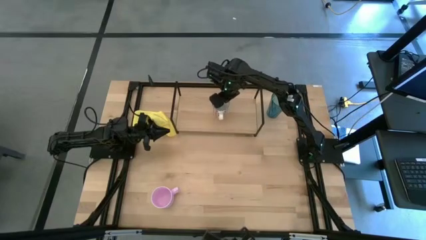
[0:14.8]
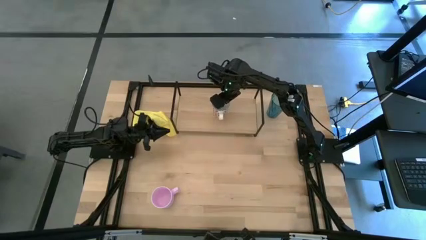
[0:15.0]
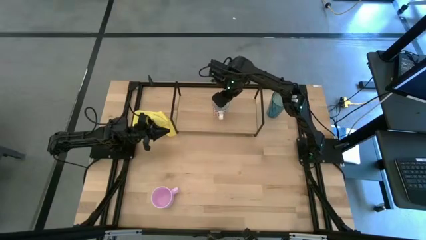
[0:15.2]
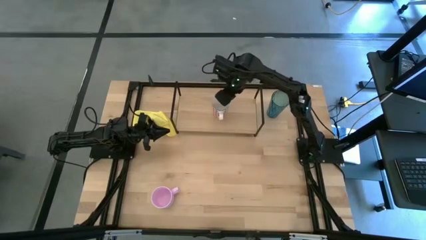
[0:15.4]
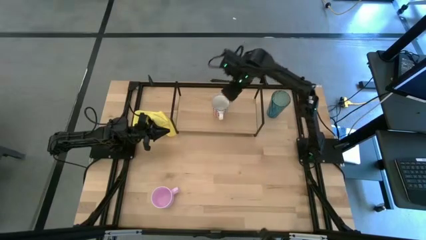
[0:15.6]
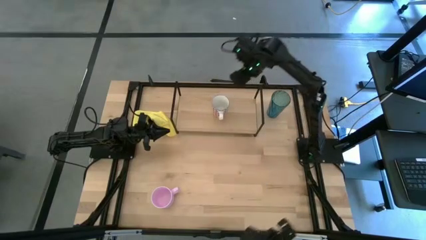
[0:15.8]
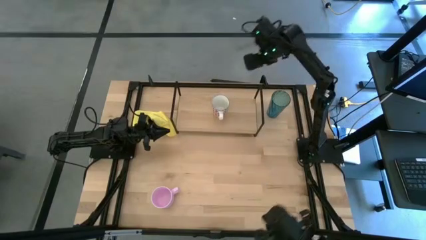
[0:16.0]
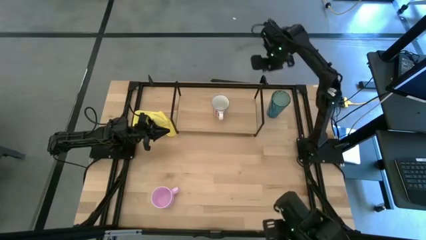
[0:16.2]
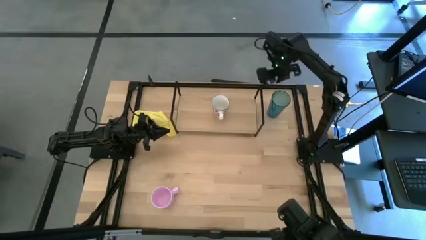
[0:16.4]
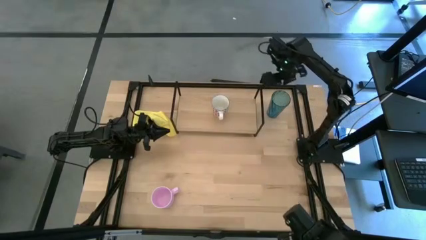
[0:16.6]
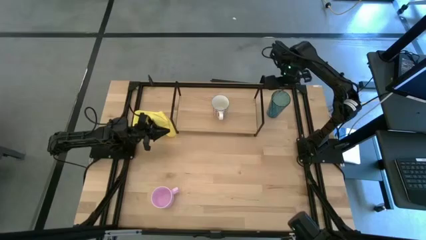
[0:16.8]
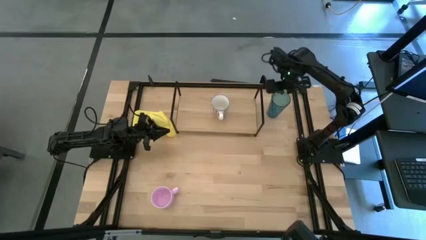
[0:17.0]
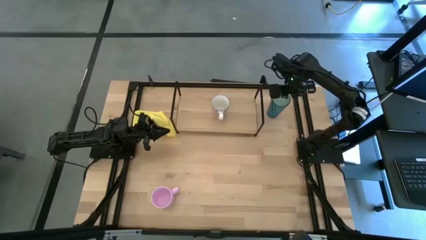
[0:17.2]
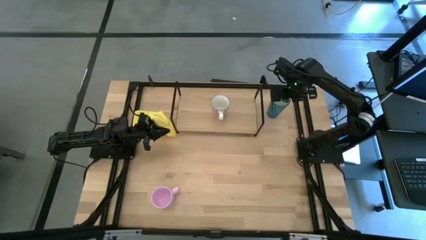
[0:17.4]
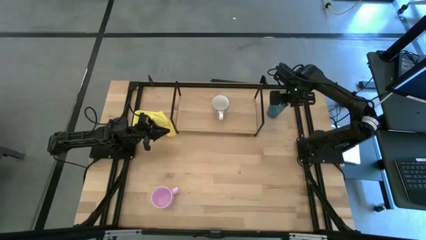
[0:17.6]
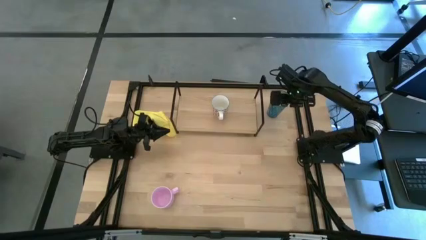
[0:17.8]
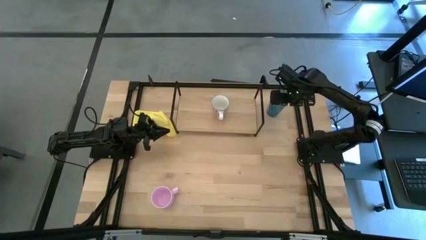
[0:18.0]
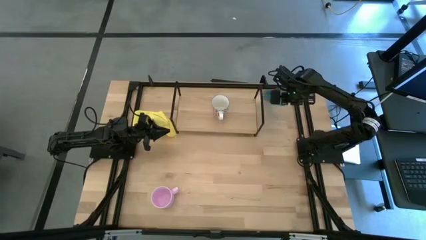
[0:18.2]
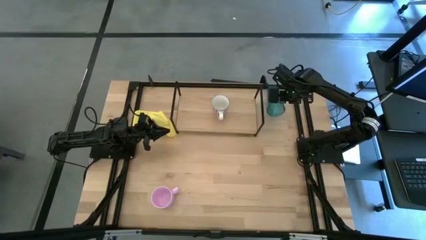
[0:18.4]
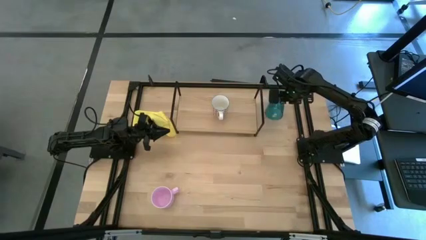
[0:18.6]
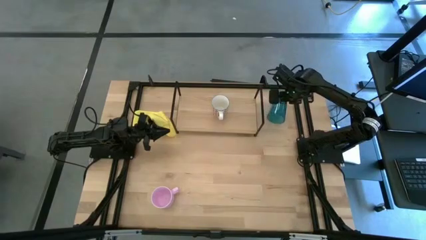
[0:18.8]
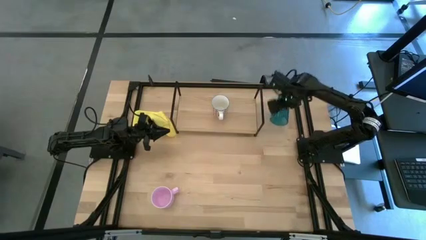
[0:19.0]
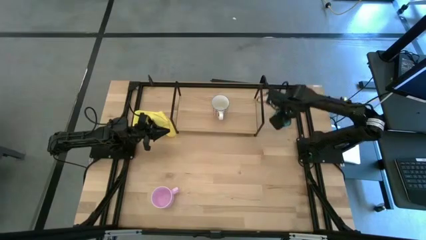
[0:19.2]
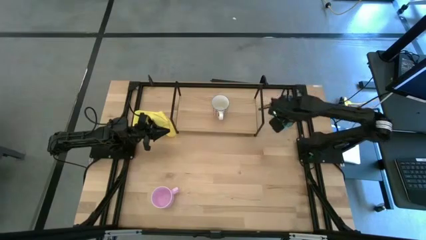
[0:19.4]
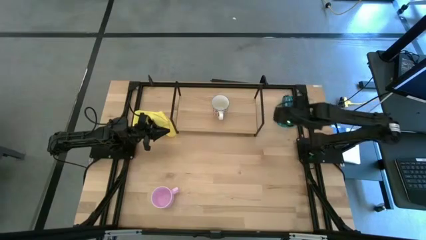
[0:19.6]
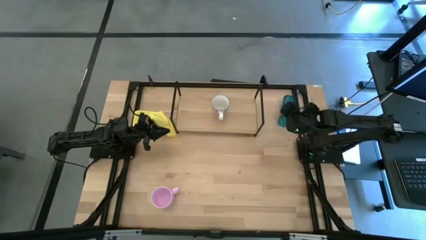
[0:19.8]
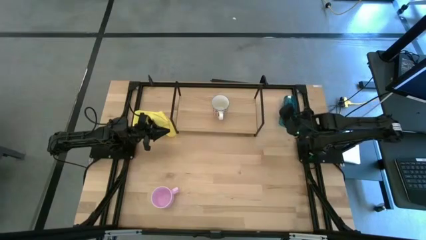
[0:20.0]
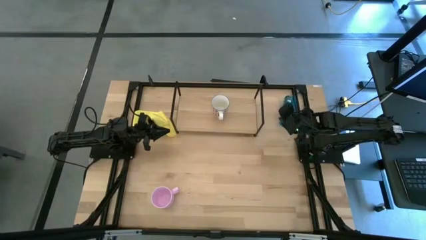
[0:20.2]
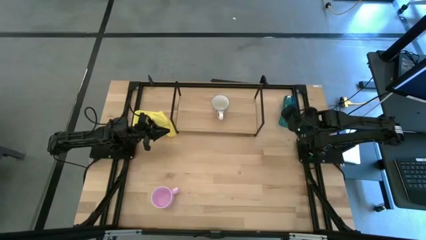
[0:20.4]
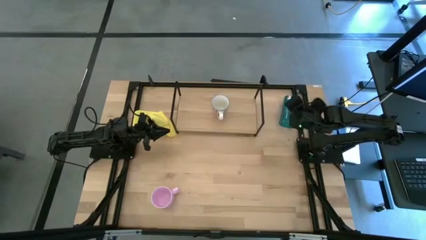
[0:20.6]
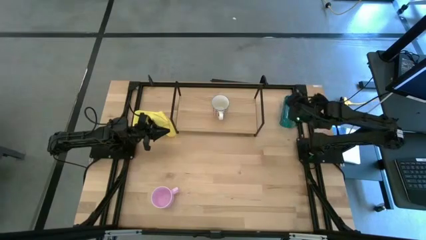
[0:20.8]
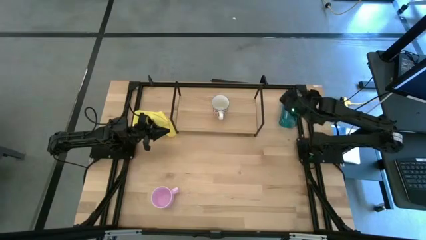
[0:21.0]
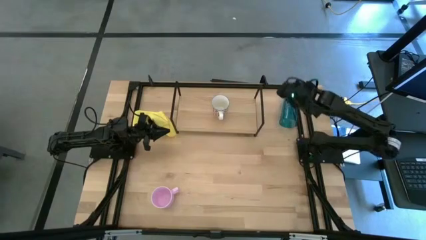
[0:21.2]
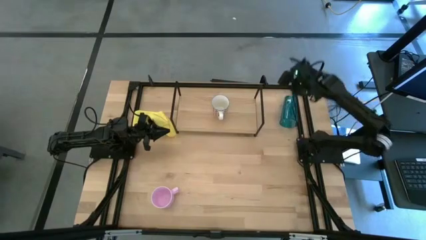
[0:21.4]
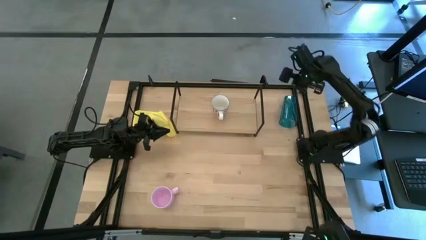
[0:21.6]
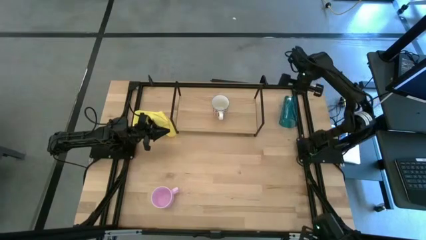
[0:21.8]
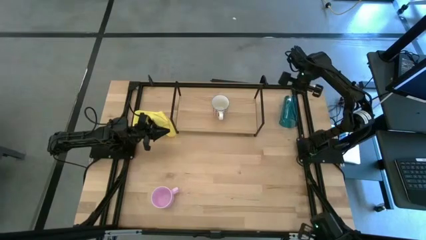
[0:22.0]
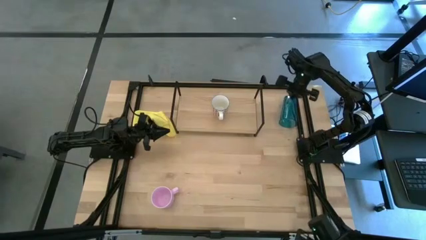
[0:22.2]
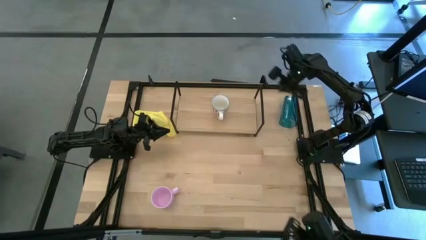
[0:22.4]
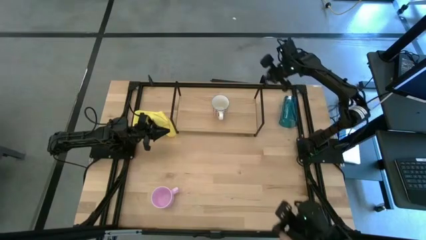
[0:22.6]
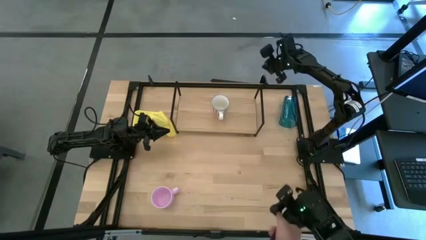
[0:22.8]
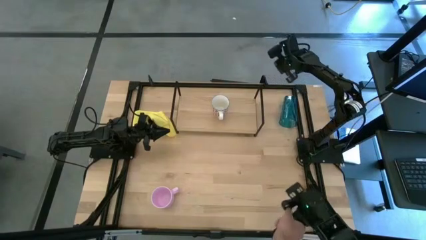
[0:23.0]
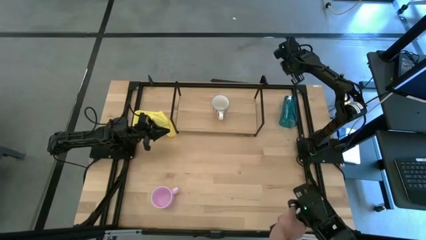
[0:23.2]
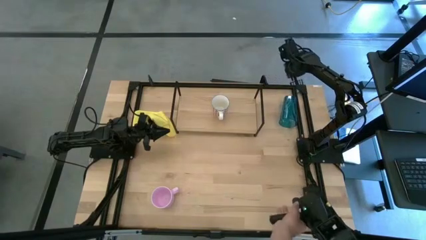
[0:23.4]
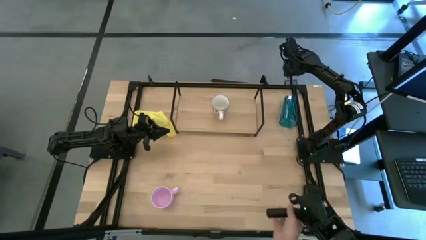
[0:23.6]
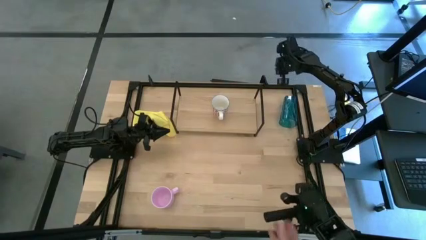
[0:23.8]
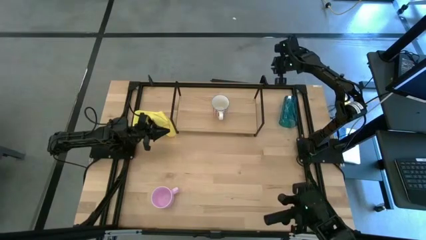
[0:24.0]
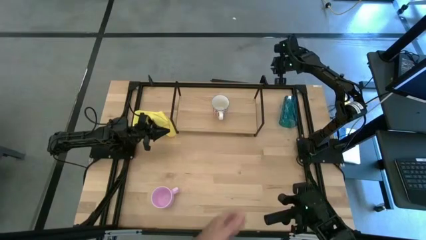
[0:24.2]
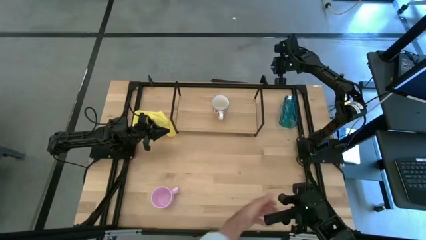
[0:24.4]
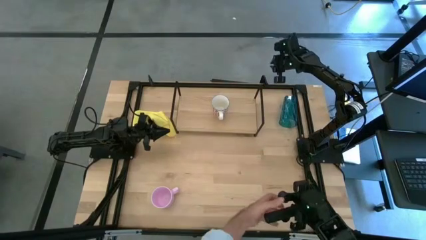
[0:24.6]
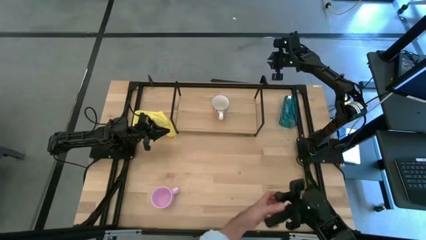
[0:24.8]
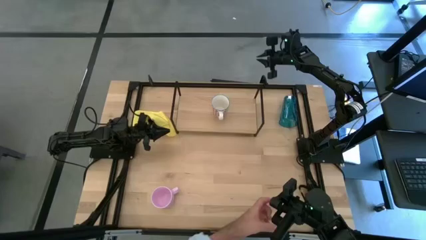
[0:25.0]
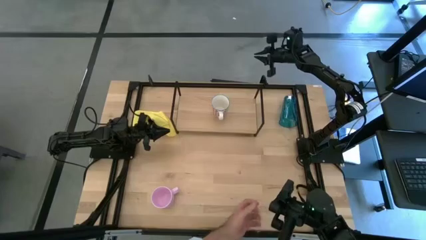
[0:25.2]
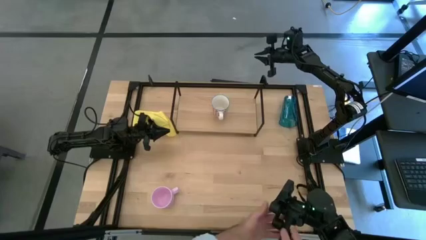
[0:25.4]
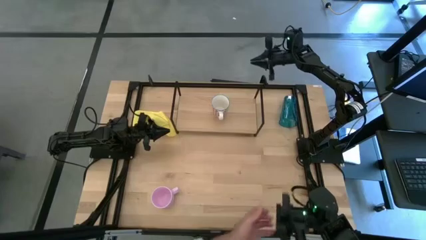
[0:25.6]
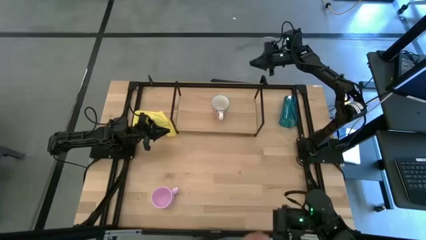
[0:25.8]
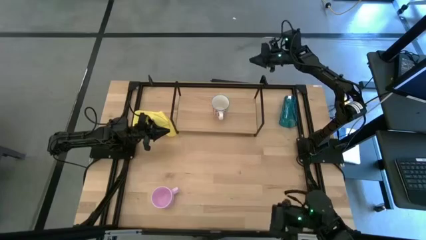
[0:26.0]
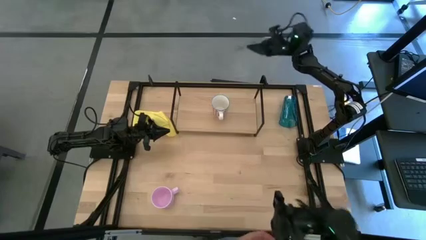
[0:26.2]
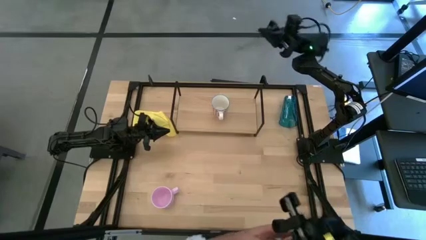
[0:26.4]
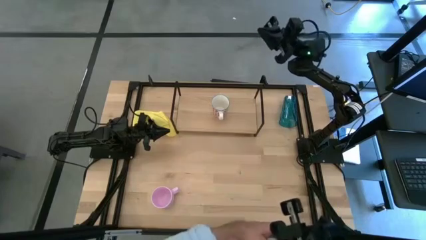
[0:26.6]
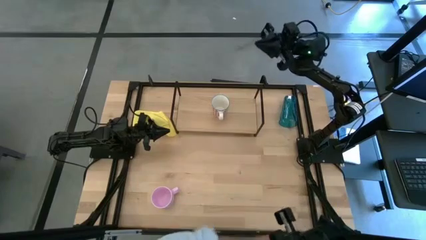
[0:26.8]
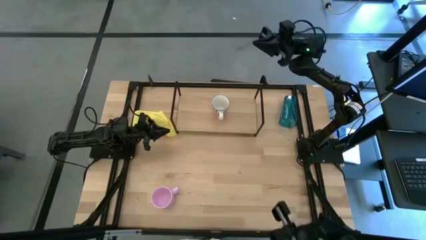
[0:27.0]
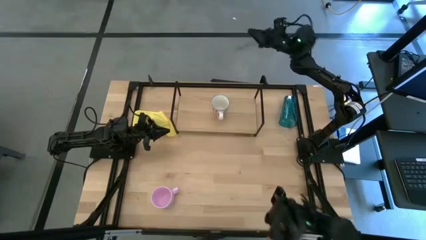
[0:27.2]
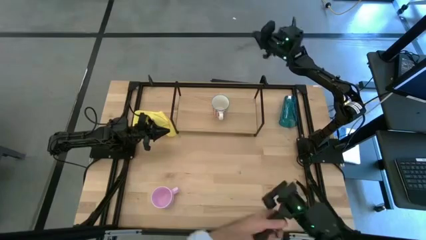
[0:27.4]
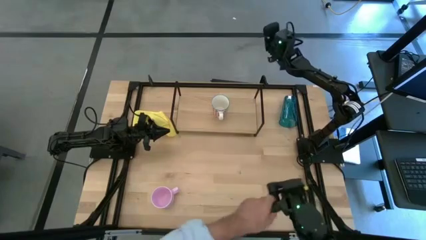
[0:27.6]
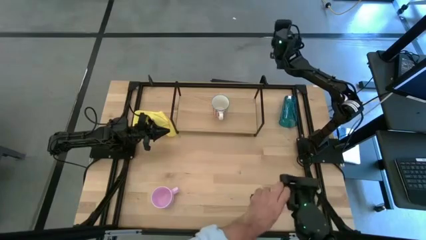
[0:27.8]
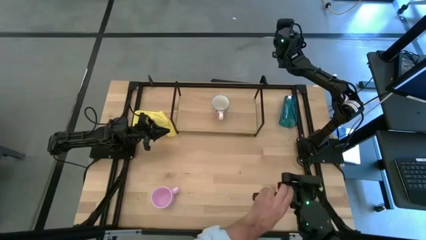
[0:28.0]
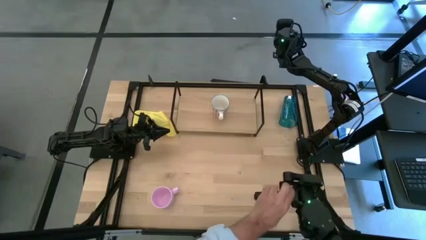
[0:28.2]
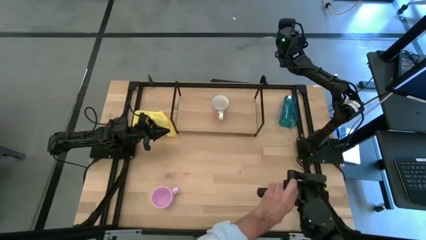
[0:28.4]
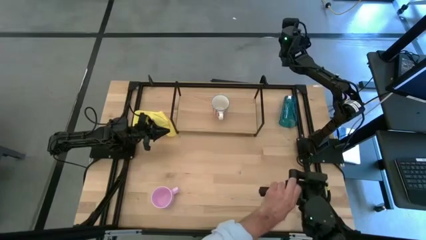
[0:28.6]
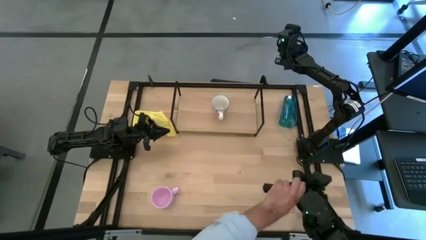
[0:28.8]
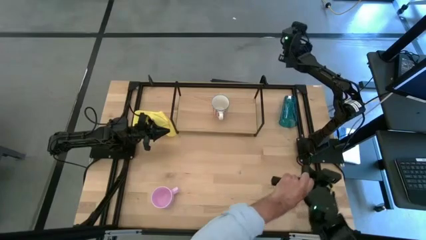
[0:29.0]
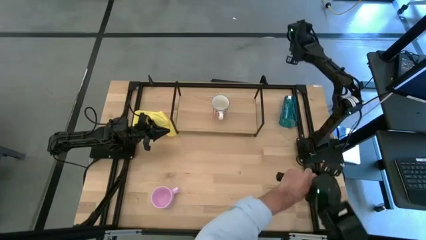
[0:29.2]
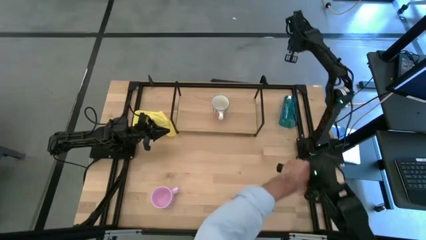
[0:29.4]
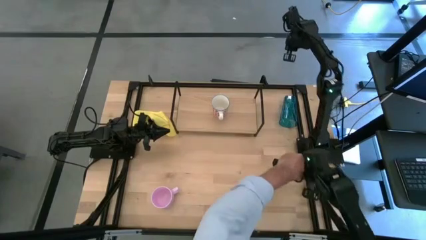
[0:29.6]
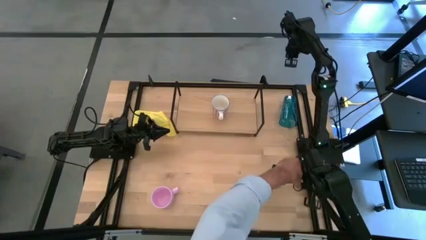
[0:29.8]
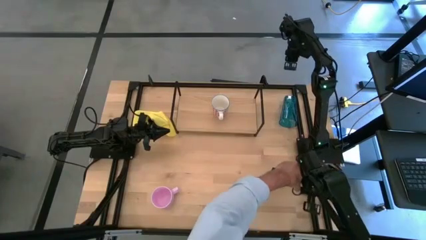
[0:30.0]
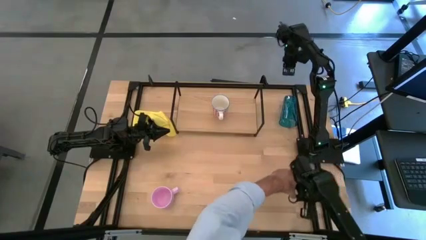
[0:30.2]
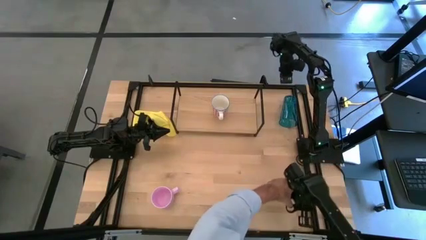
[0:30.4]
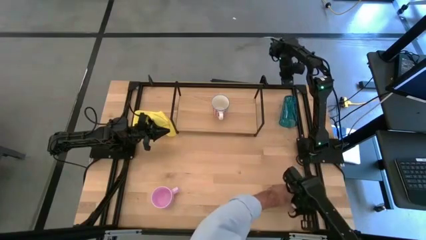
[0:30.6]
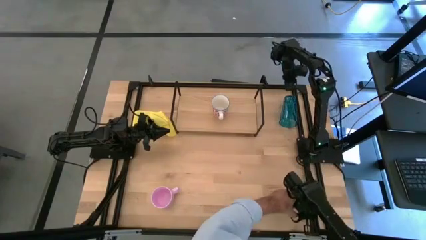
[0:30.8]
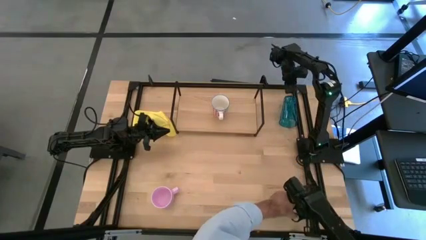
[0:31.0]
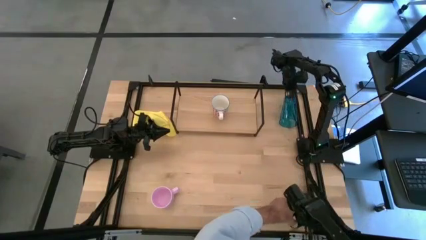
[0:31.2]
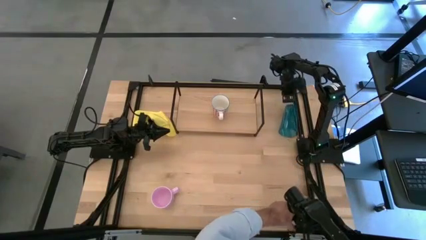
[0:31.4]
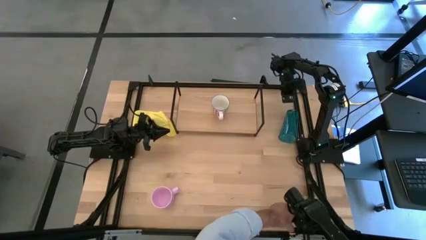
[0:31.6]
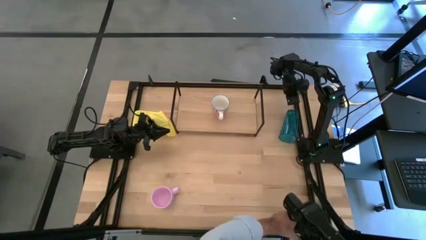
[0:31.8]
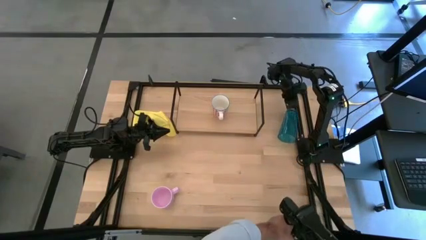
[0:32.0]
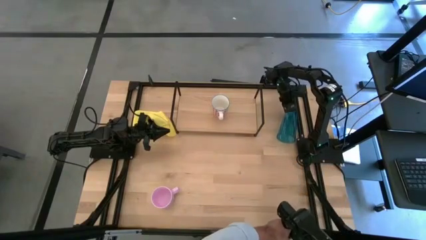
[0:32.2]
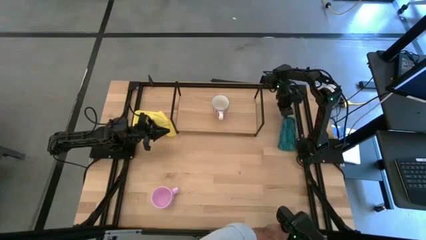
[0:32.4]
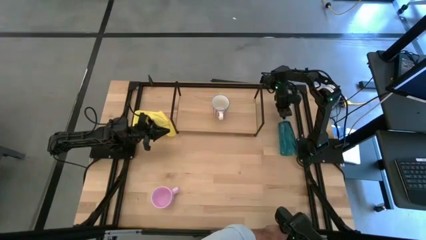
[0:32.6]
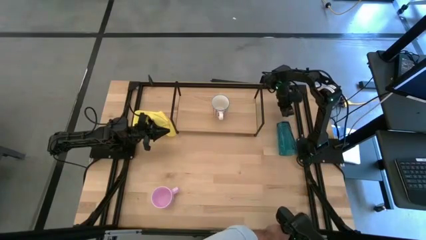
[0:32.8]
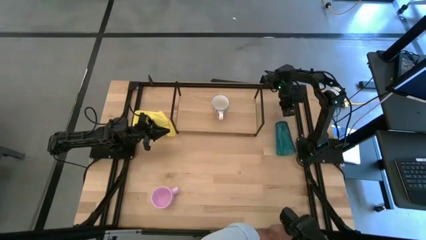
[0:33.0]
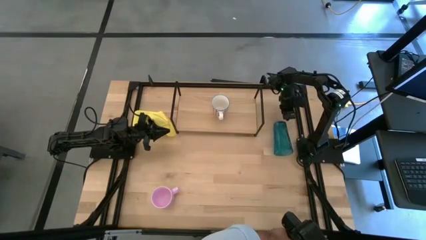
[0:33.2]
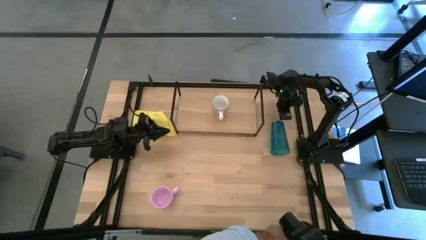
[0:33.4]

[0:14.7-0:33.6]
Task: Stack small to large cups/mugs on shelf
Put the blue cup on the shelf
